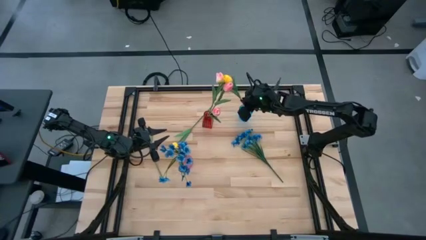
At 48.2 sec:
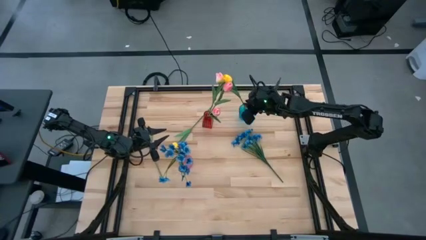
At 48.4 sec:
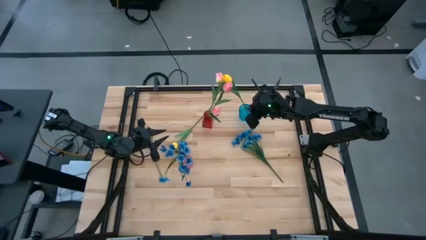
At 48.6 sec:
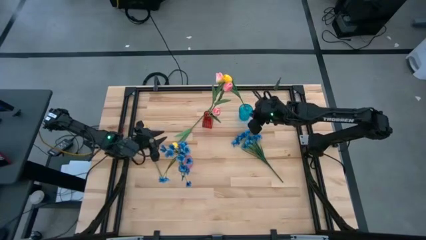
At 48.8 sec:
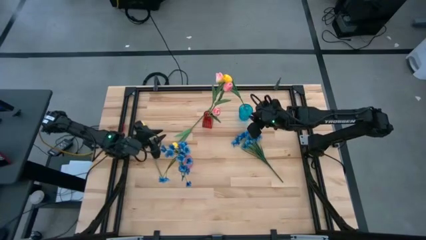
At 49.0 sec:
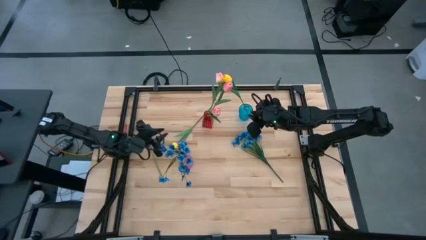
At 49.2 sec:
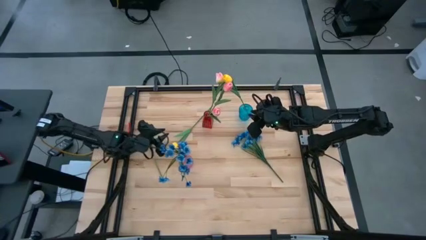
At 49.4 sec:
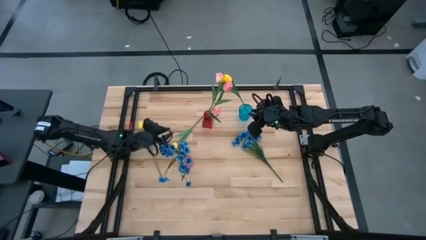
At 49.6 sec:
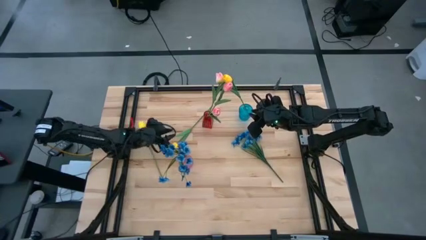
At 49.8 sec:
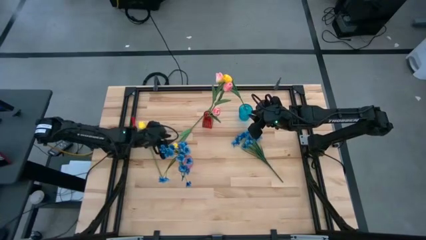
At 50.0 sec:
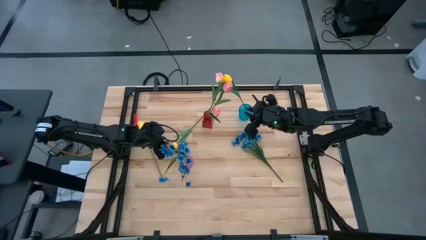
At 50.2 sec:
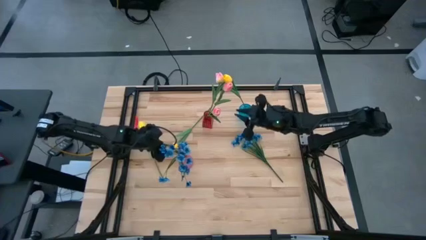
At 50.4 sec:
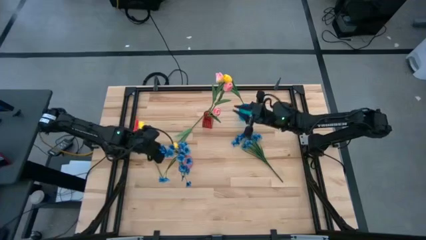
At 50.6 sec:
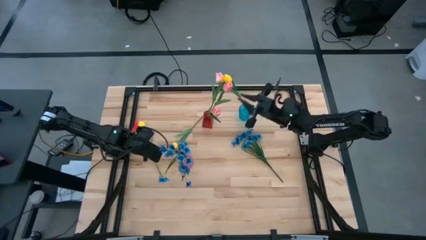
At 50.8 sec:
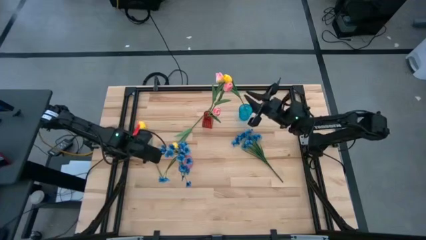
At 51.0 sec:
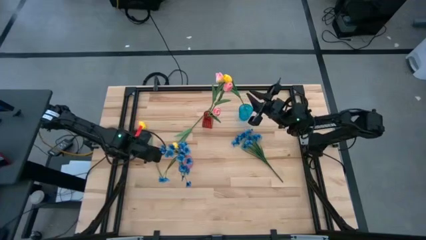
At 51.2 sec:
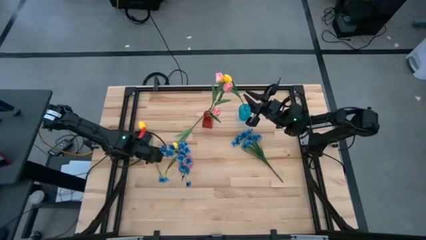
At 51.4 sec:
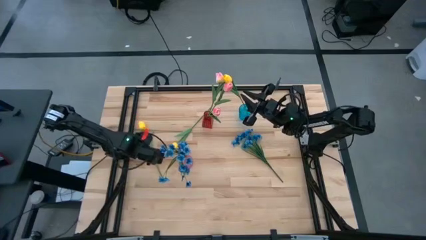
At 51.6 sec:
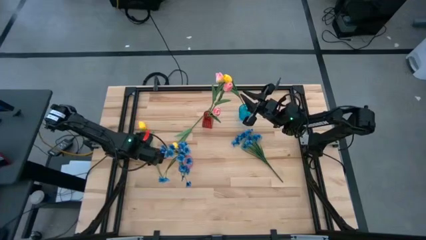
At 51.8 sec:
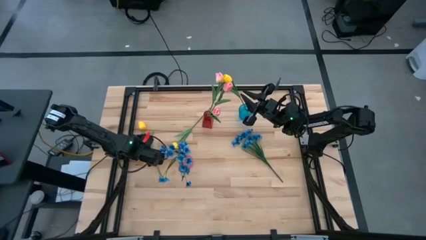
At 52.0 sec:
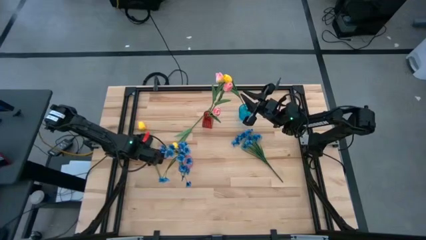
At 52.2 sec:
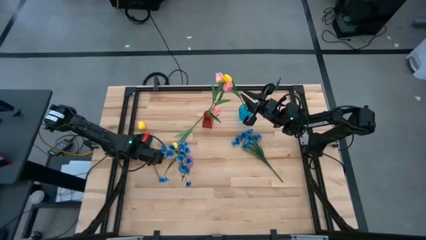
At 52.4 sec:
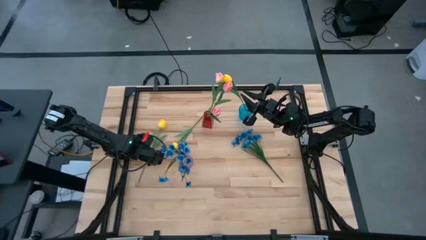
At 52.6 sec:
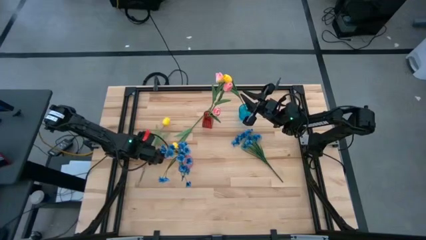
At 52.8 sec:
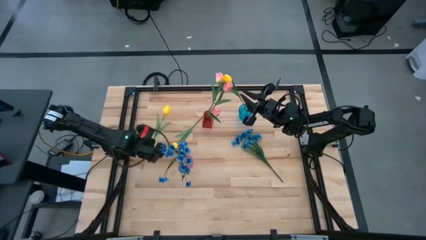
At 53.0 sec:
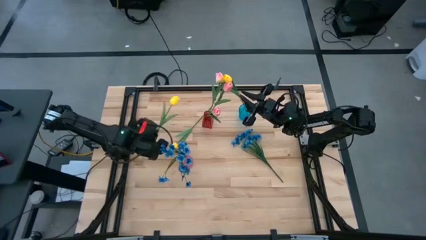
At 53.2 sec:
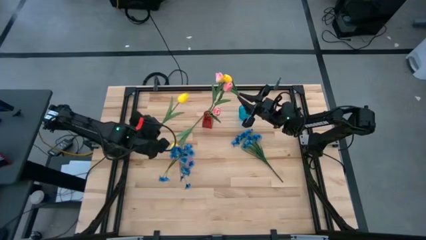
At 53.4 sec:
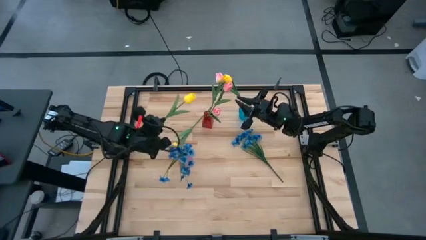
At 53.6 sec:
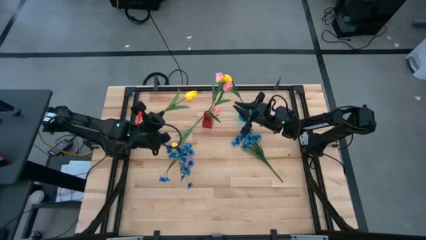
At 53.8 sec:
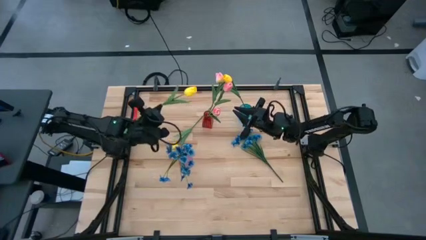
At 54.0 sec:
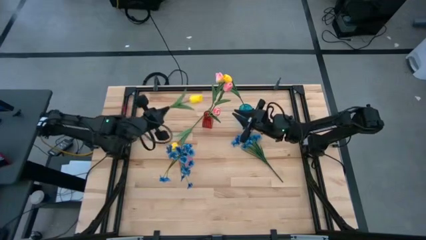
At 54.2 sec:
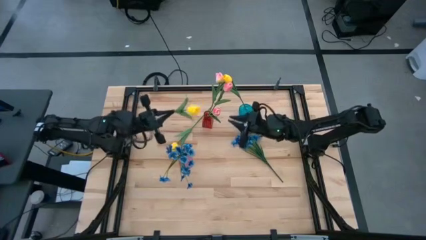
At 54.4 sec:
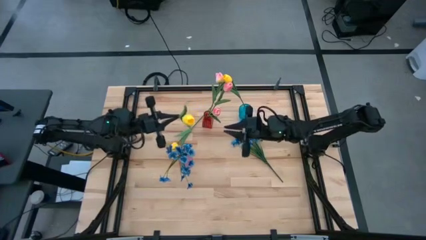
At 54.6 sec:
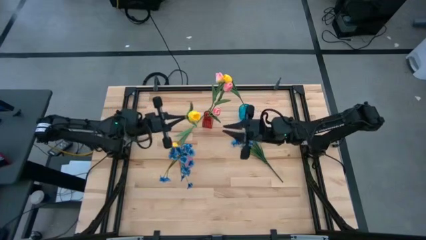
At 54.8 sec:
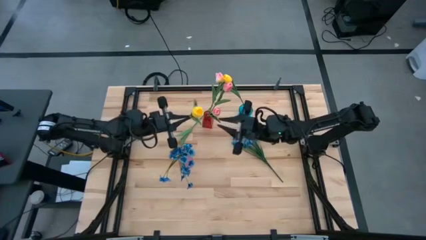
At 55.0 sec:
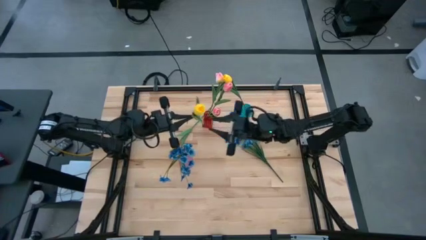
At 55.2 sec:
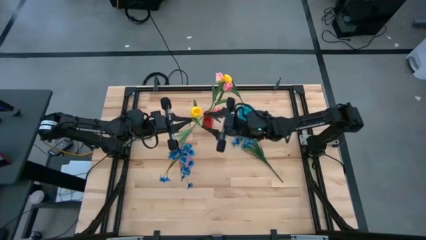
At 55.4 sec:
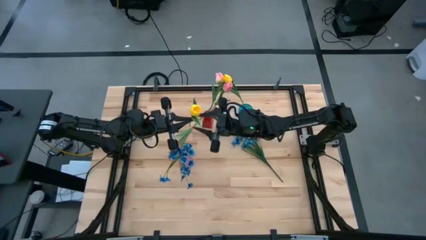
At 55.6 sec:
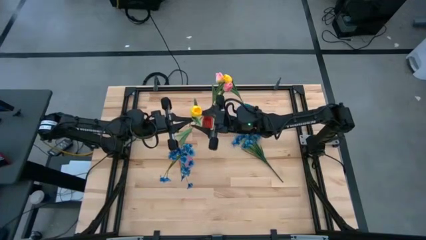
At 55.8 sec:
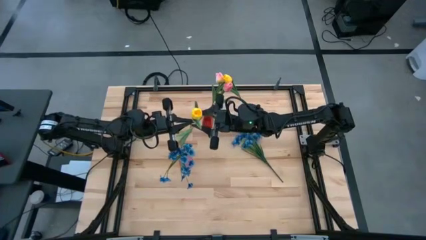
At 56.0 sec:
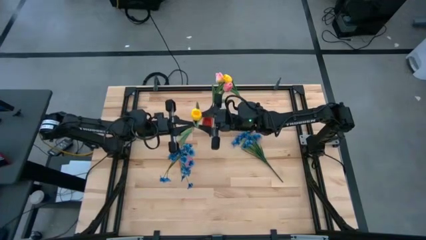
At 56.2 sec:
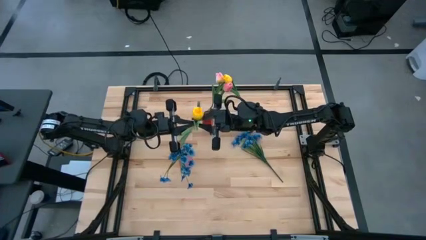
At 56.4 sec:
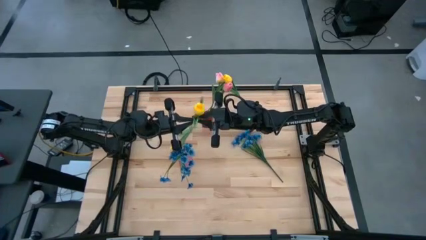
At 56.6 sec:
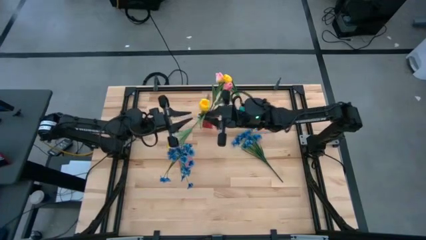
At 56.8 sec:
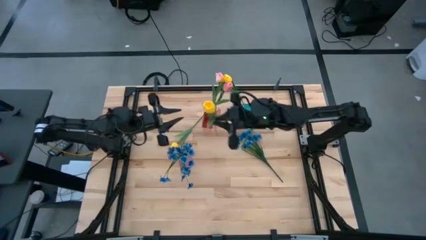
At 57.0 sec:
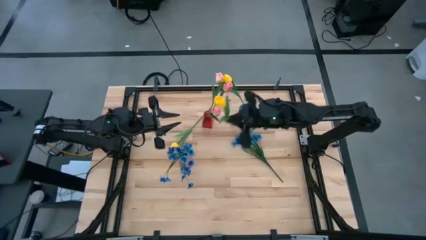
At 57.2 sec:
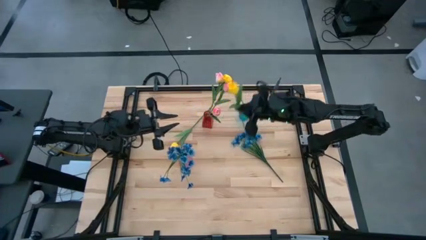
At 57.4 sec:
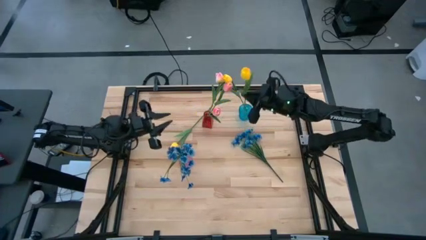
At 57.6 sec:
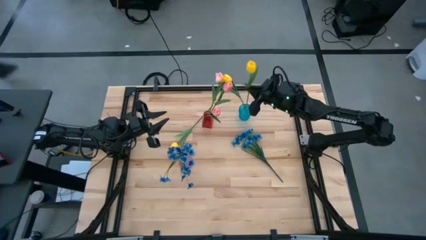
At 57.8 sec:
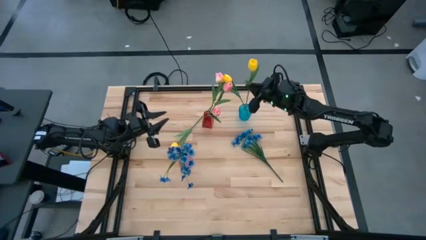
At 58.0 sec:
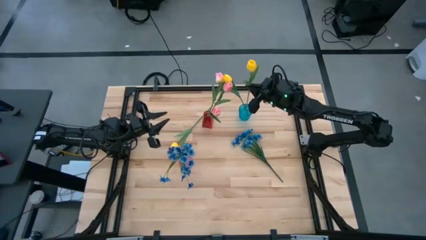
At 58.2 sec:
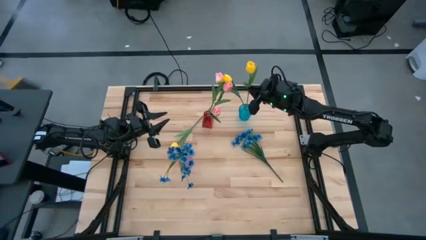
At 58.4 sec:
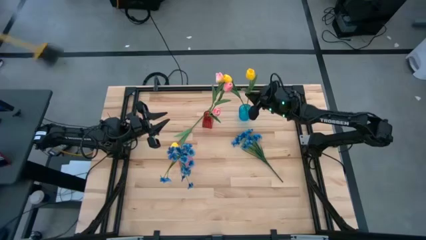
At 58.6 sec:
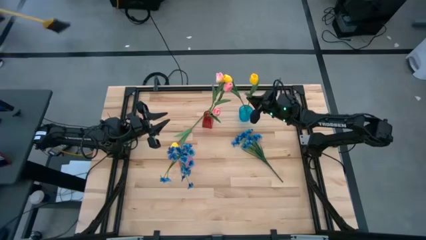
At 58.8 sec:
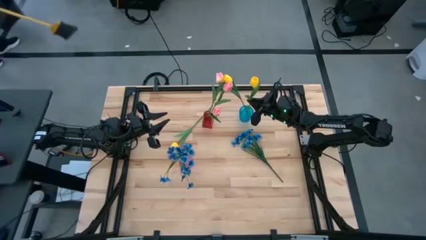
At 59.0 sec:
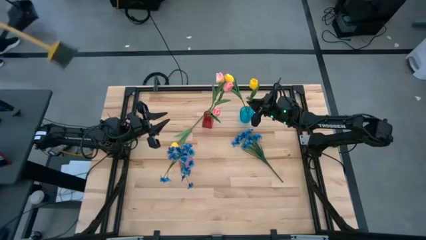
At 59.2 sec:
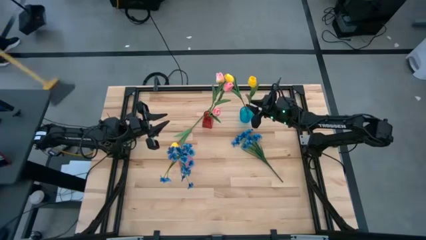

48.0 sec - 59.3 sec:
Task: Sort flowers into vase by color
Put the yellow flower into the blue vase

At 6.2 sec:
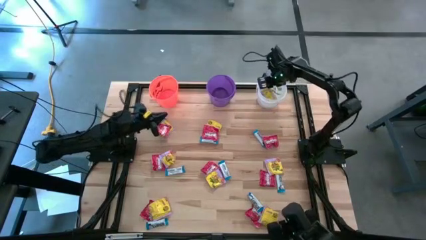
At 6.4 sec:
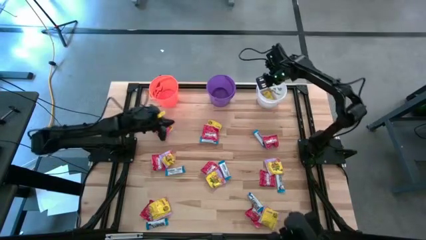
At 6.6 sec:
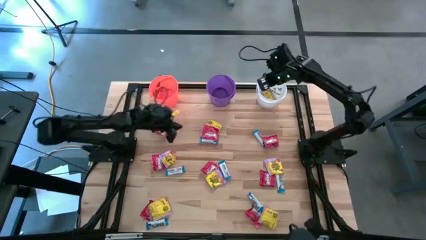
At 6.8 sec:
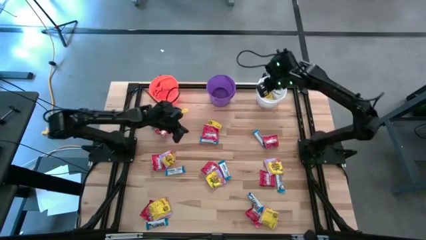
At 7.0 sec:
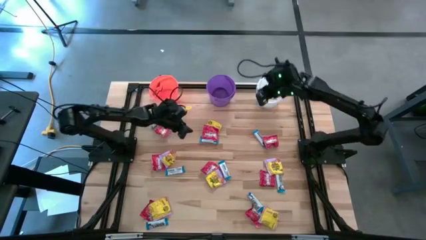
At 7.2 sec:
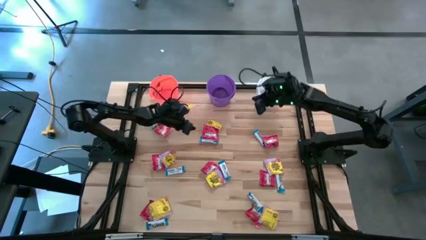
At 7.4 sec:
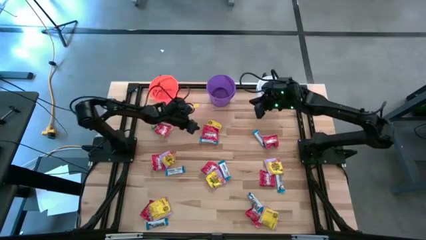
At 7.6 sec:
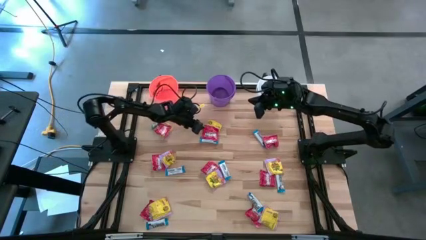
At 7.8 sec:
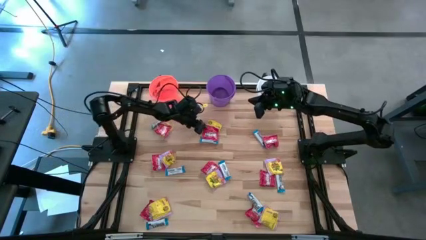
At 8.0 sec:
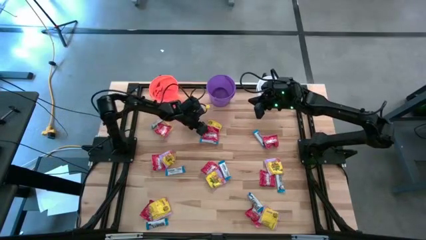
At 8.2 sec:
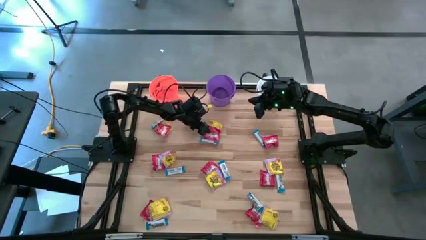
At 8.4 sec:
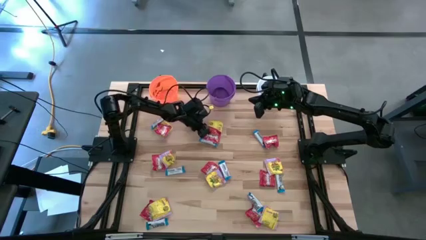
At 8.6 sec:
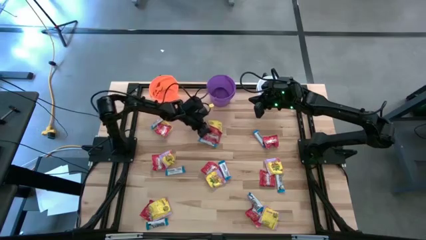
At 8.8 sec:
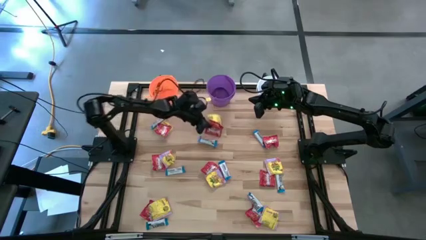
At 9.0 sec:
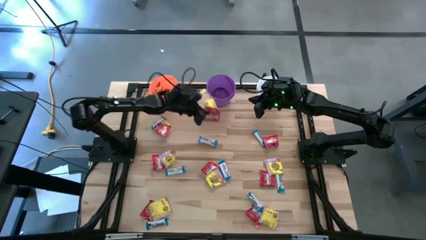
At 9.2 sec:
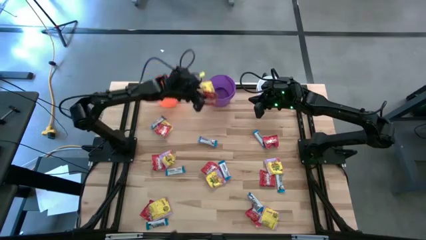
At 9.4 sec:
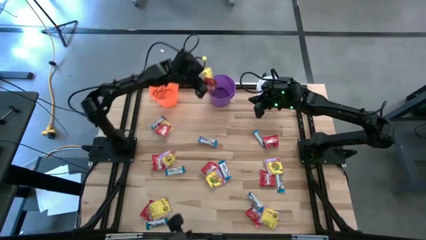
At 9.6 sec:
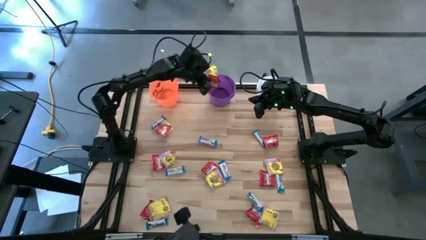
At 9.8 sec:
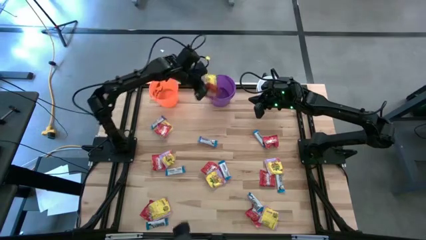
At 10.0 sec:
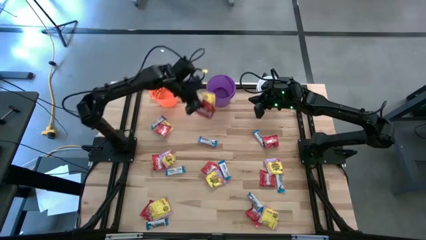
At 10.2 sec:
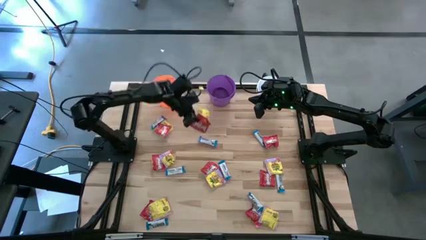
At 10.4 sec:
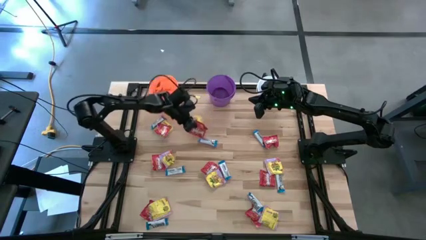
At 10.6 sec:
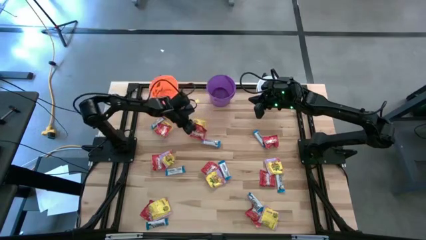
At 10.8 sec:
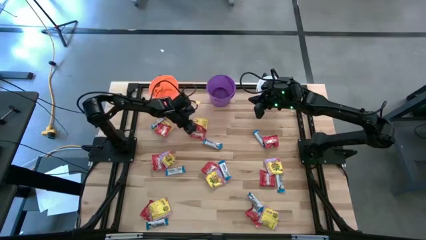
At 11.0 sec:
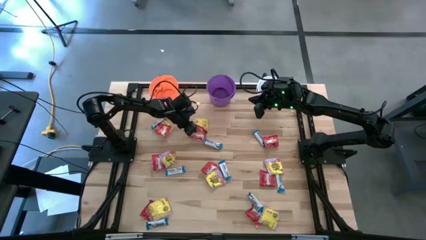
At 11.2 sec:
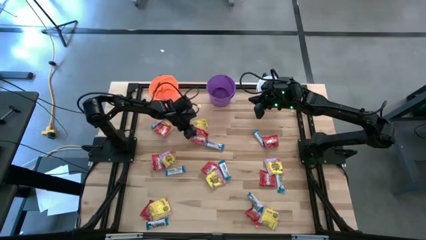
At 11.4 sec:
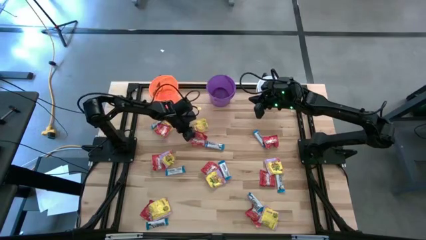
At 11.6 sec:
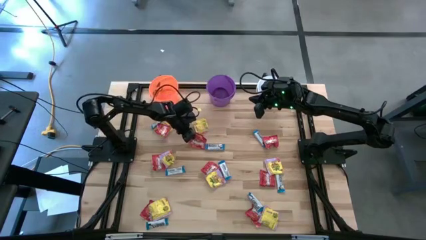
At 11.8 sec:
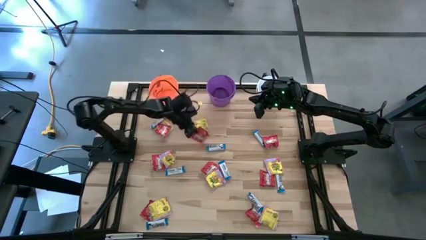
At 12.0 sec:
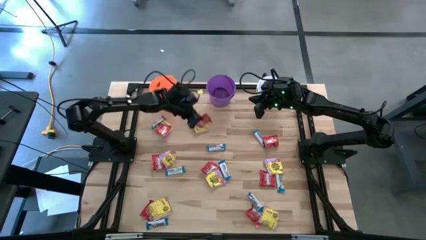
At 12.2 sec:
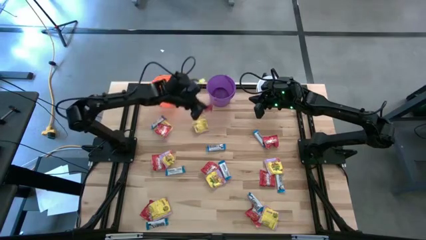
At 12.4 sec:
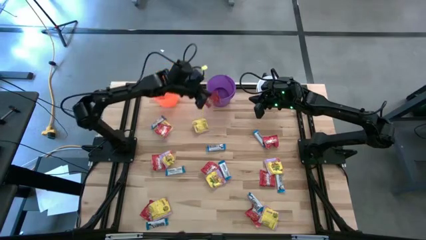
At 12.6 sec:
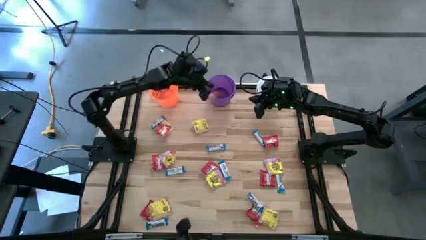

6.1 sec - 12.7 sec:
Task: Sort candy
Put the red candy into the purple bucket
